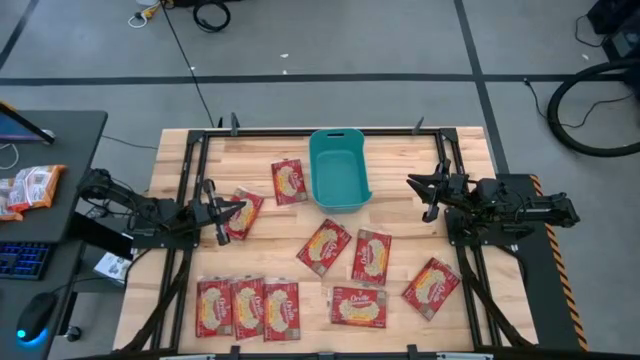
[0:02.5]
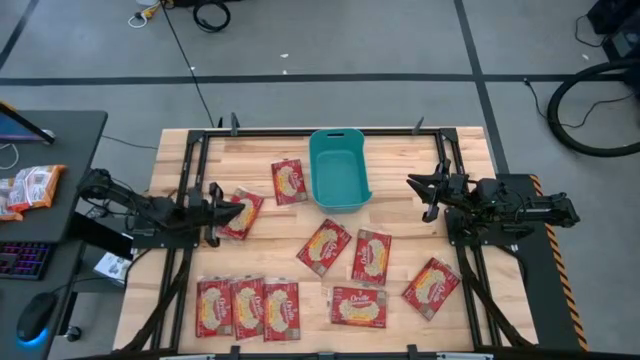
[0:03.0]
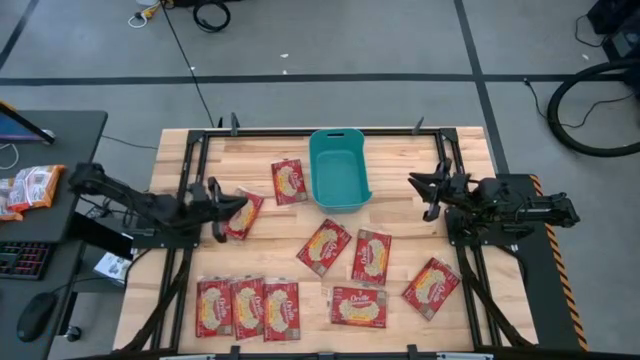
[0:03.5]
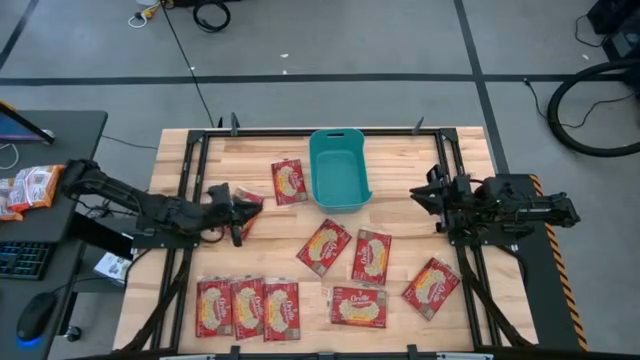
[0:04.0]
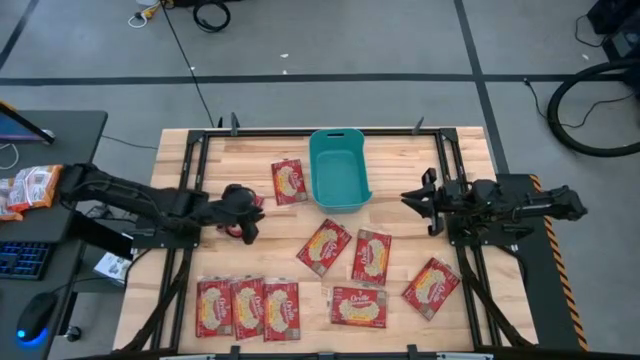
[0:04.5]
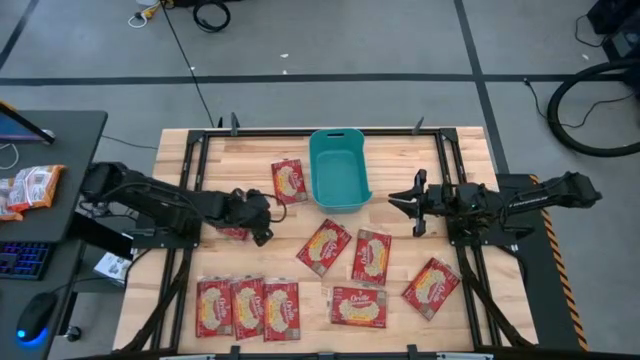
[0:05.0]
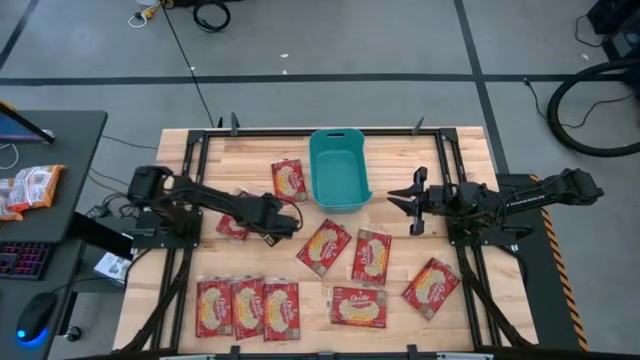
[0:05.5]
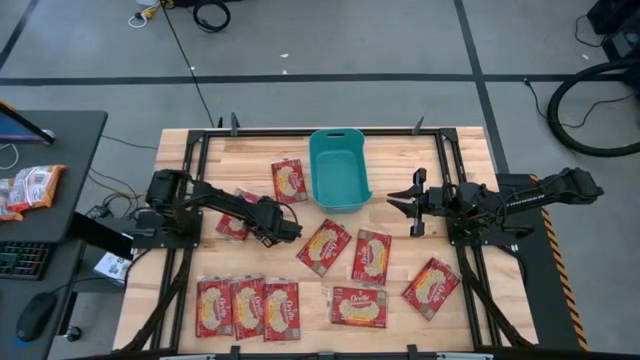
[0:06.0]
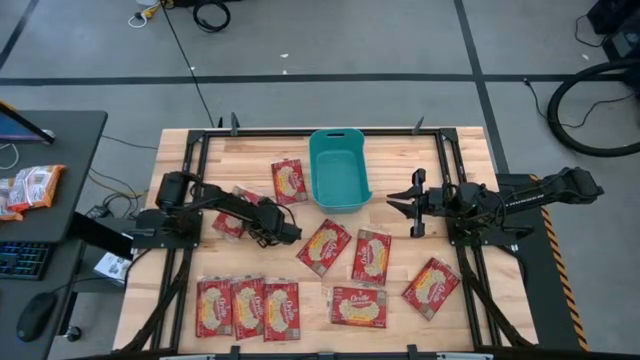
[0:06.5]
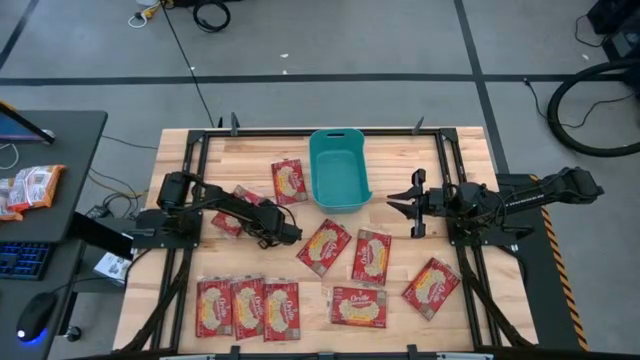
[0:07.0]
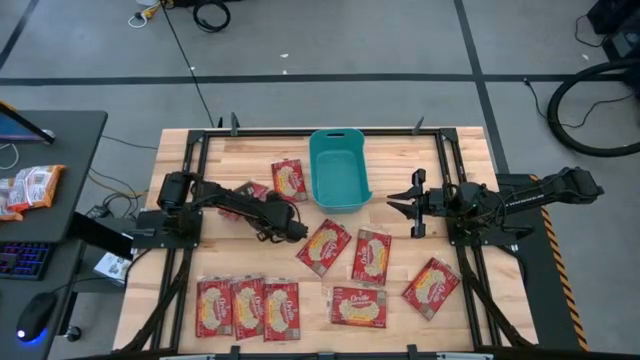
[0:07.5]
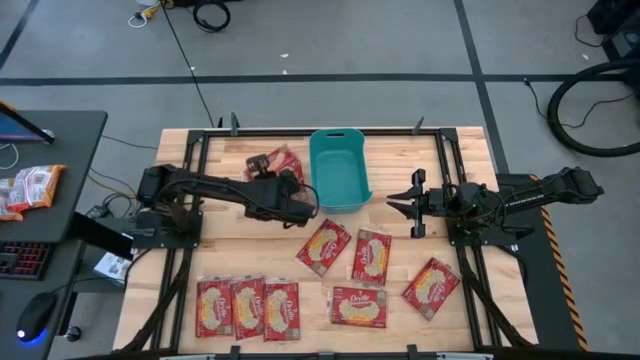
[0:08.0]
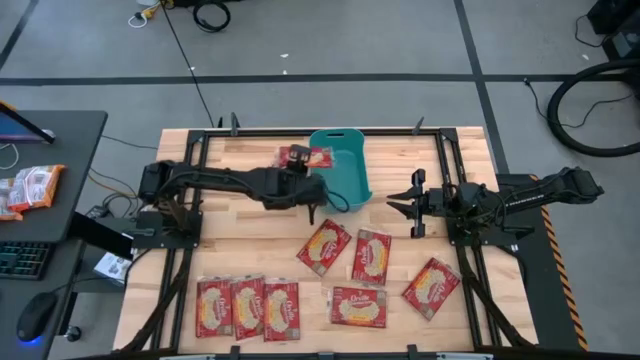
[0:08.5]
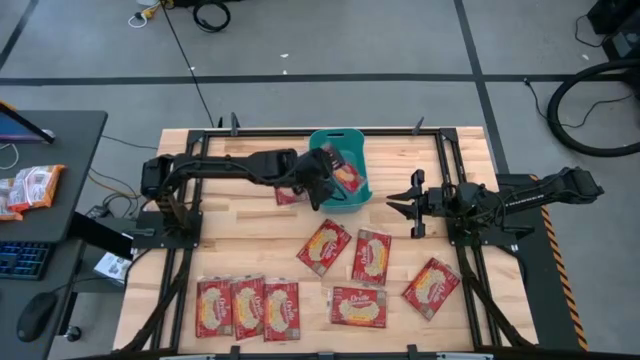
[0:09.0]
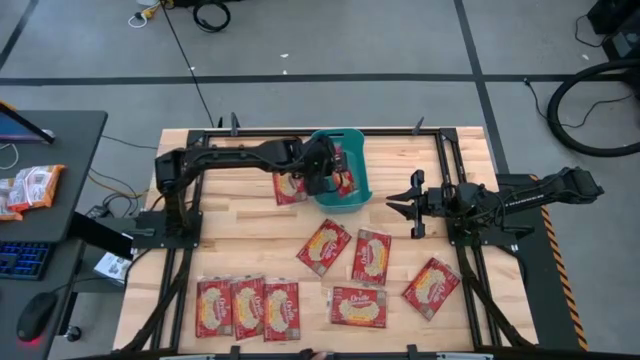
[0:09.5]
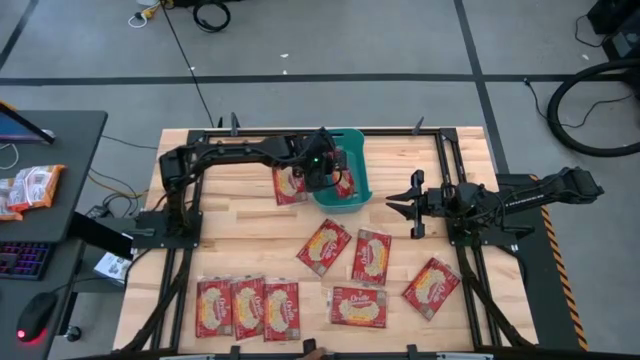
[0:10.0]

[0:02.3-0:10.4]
Task: Sort popcorn bags into baskets
Put the red popcorn bag into the green bin

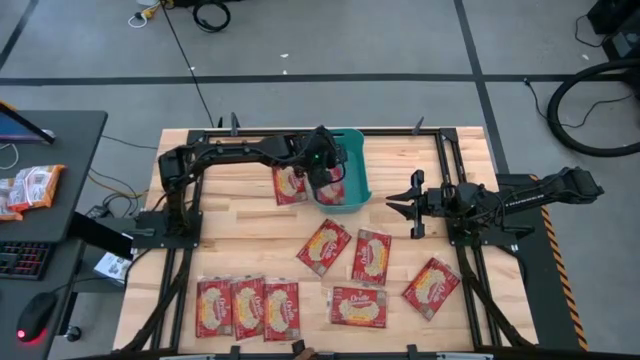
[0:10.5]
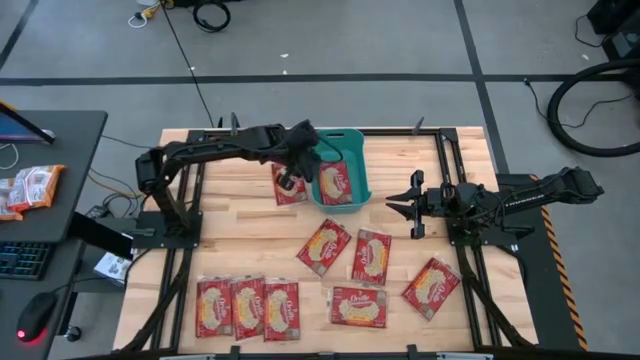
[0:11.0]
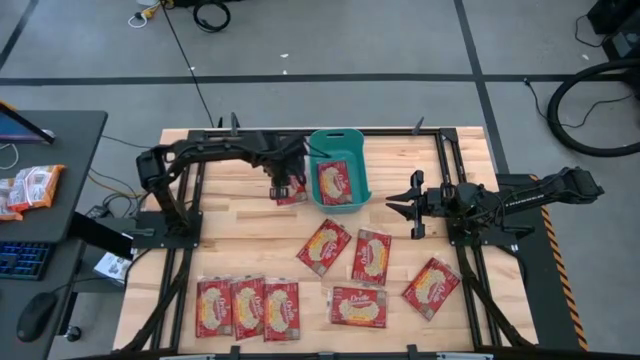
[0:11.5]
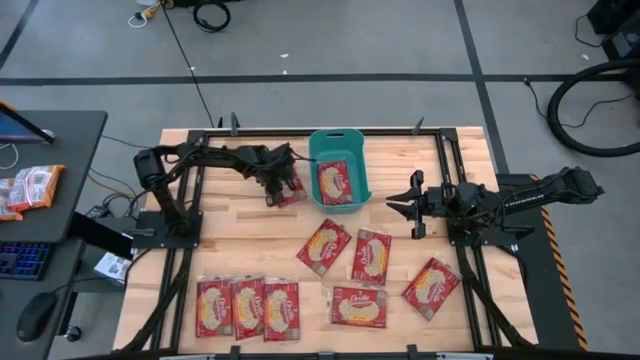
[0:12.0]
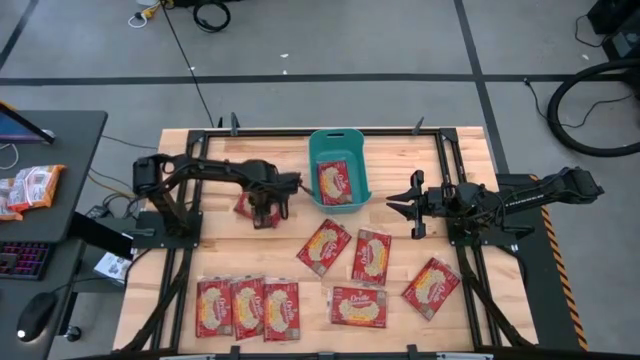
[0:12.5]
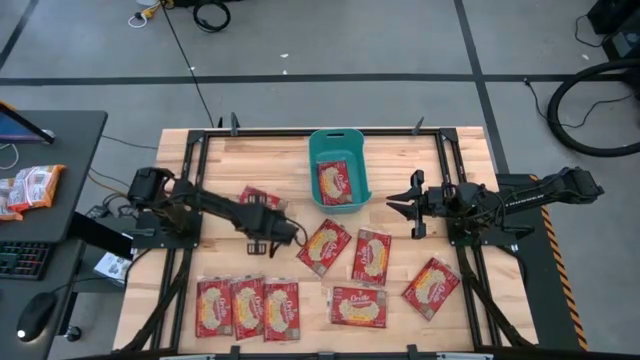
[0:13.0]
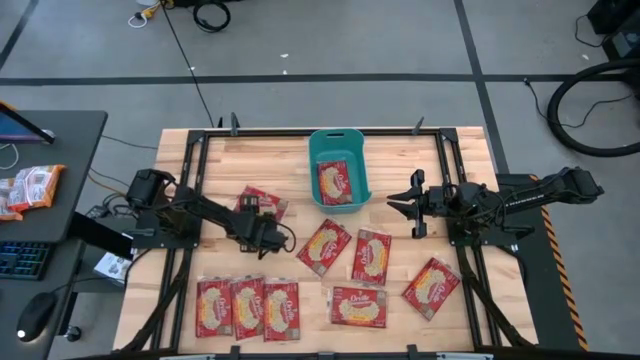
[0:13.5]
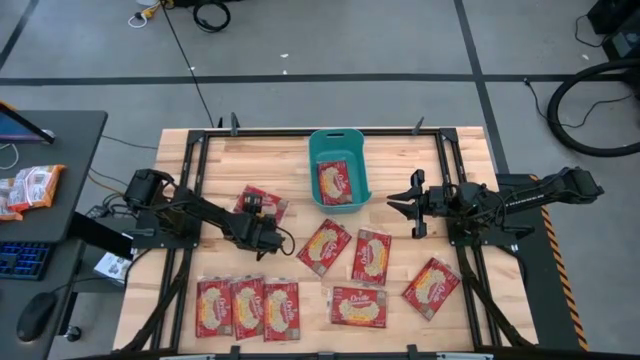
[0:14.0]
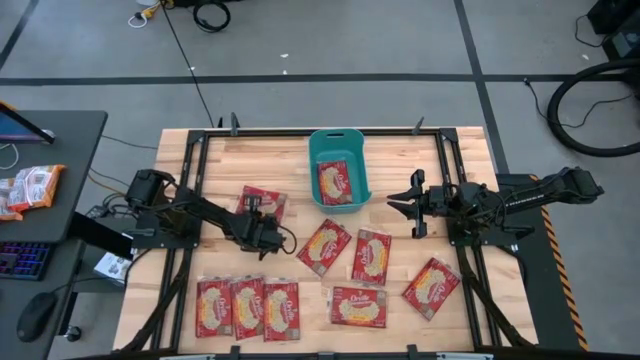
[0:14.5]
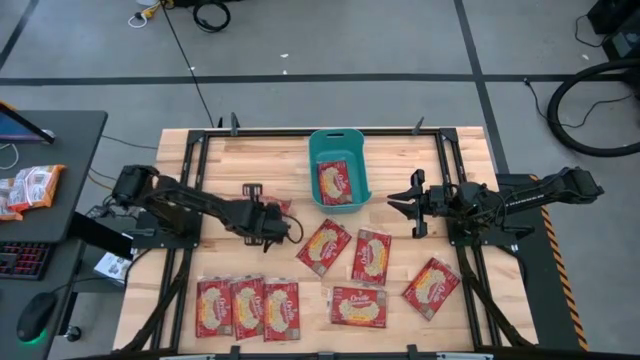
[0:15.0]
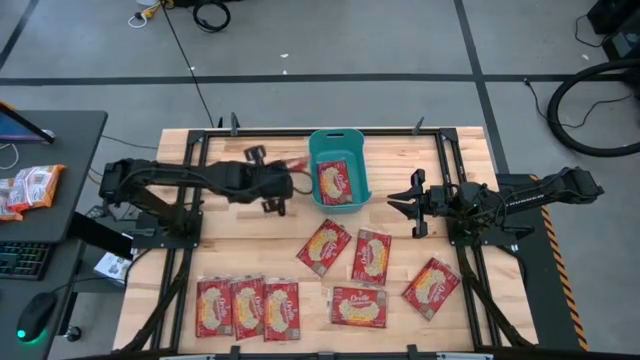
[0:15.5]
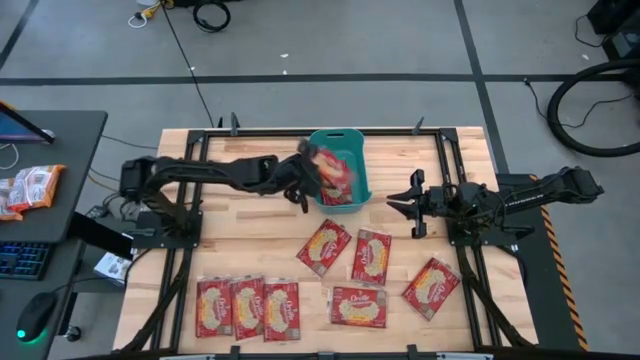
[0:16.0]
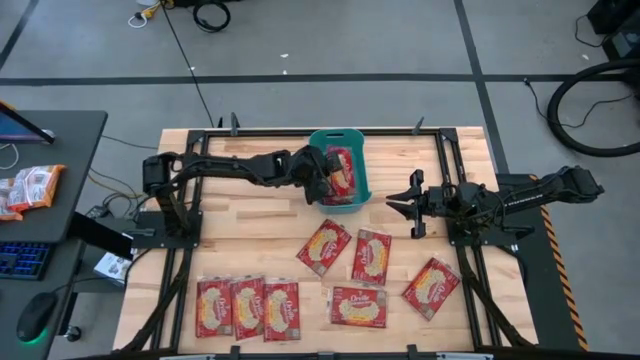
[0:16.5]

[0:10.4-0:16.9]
Put the red popcorn bag into the green bin

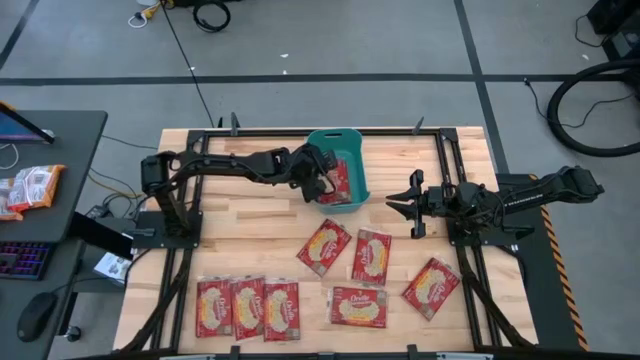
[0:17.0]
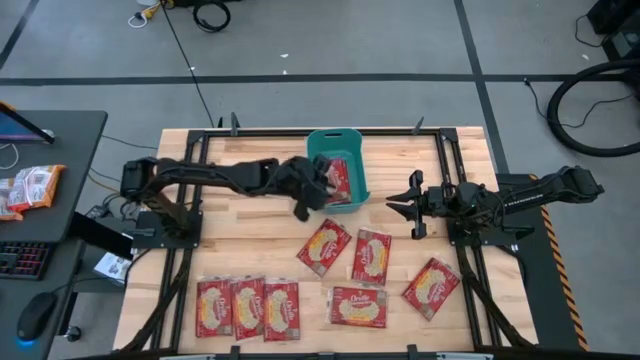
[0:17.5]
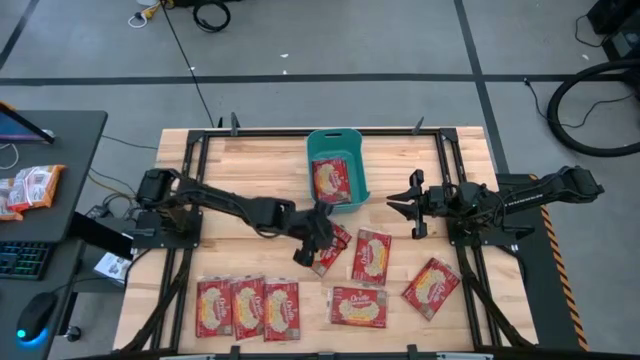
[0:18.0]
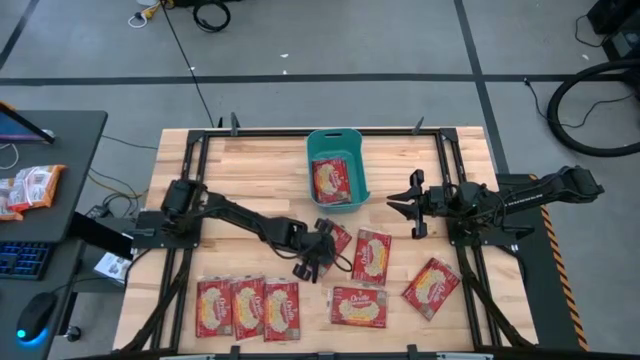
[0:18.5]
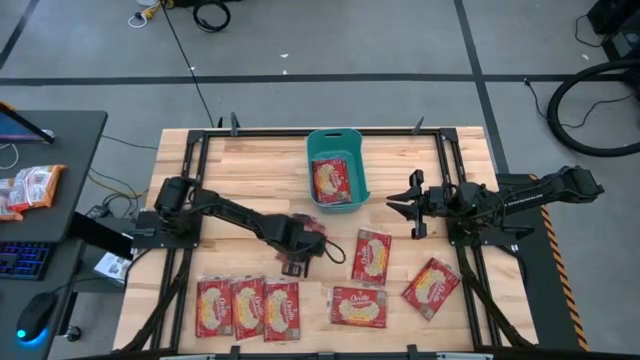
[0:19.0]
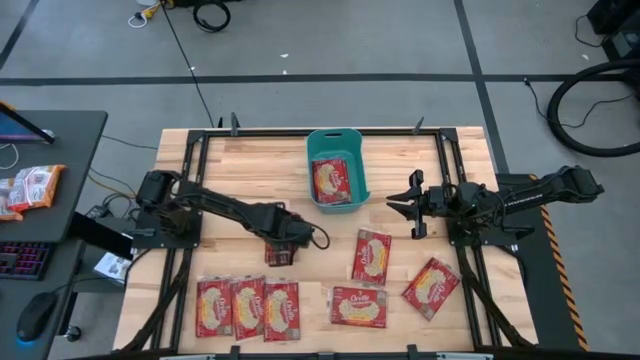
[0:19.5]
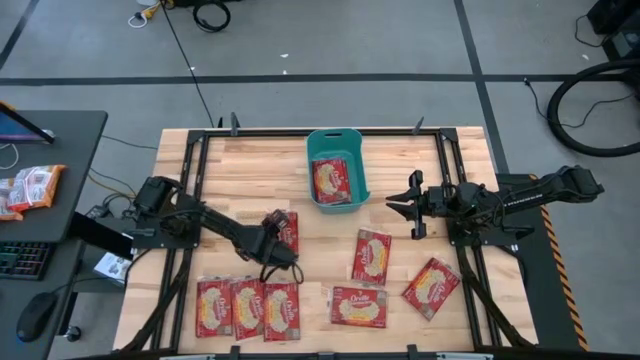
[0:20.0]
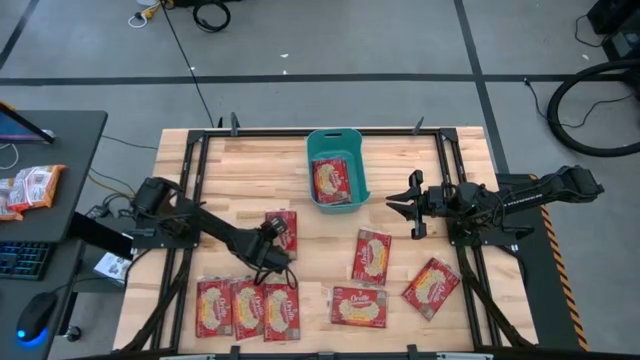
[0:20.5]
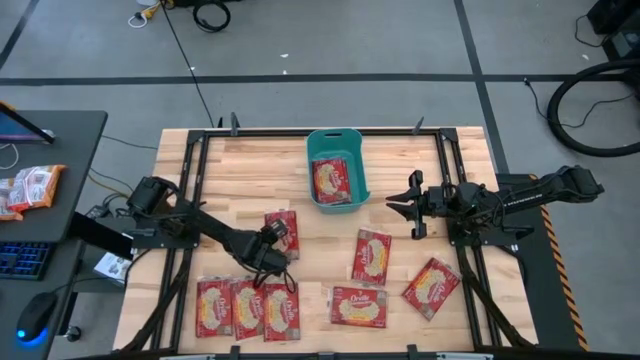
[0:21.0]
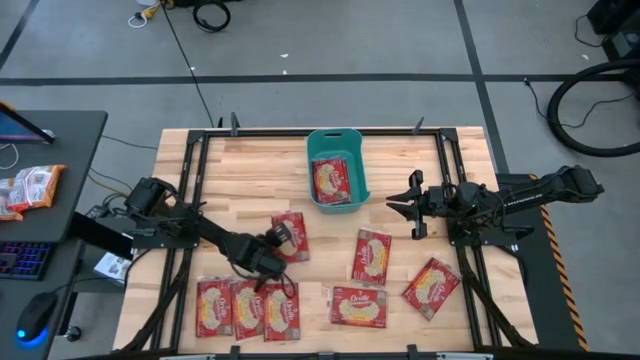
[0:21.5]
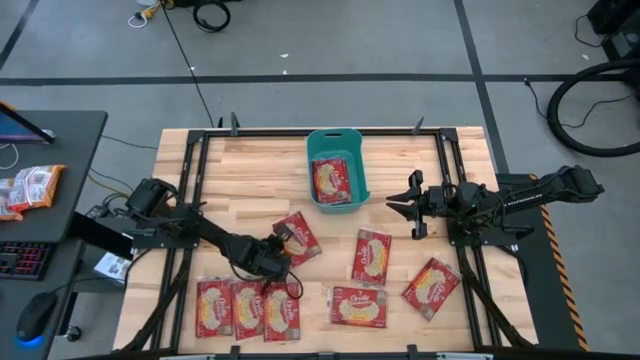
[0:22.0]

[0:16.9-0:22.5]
Put the red popcorn bag into the green bin

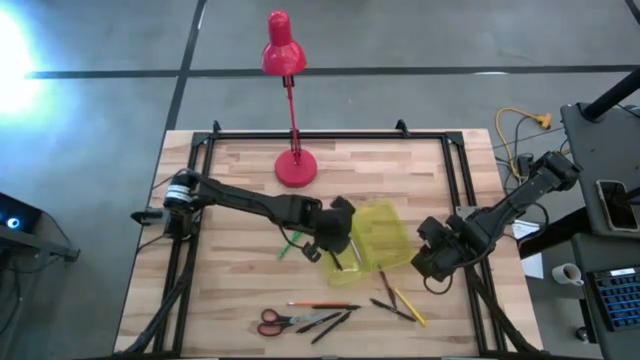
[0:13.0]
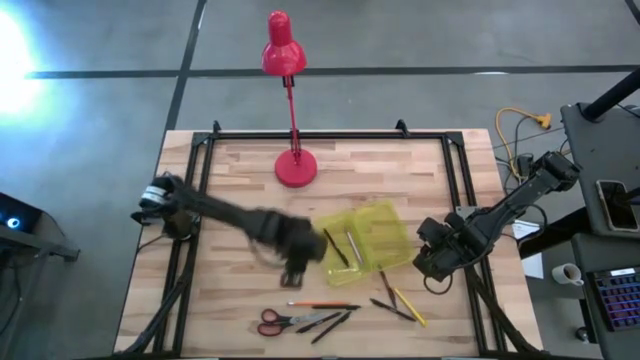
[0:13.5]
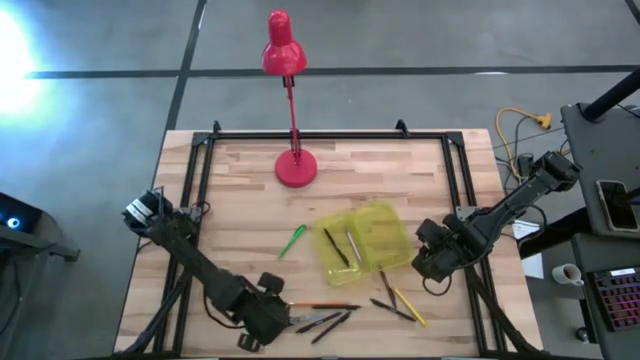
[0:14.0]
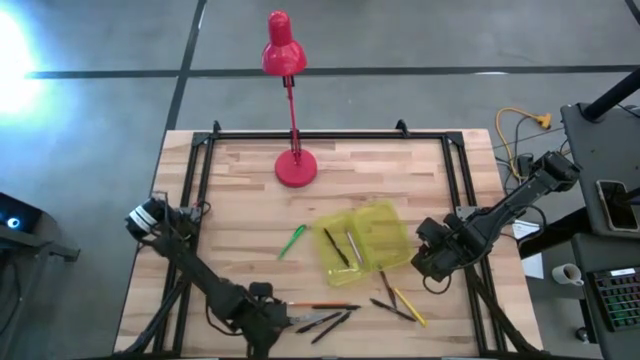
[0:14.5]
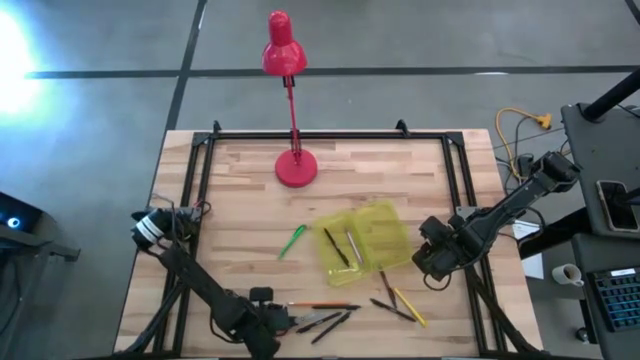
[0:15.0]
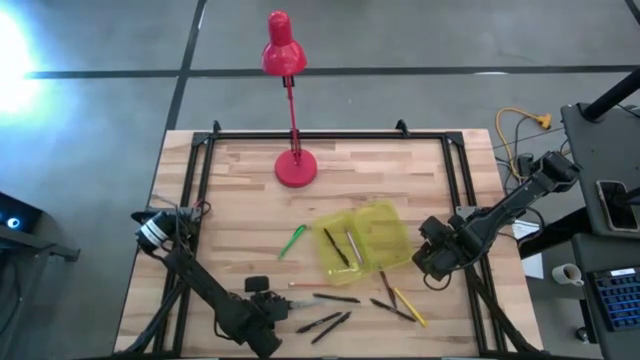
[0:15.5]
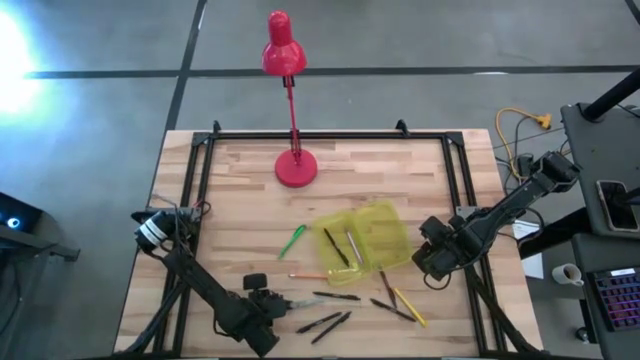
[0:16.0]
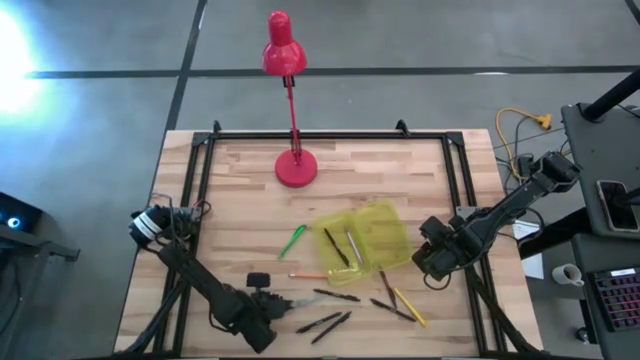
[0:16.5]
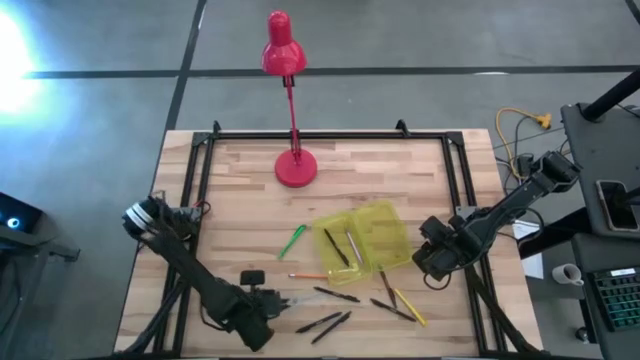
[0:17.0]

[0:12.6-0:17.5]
Task: Pick & place school supplies into a supply box
Put the black scissors into the yellow supply box
